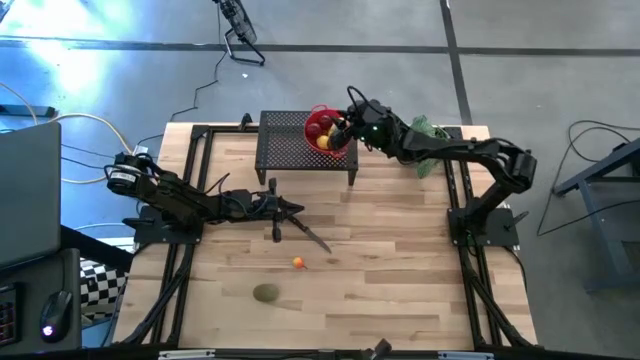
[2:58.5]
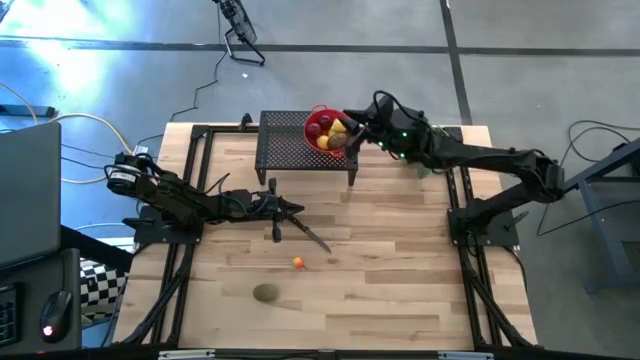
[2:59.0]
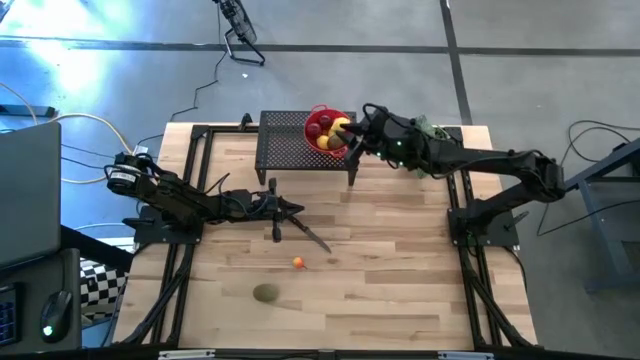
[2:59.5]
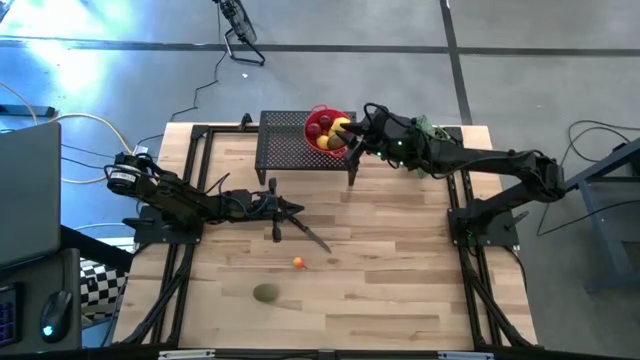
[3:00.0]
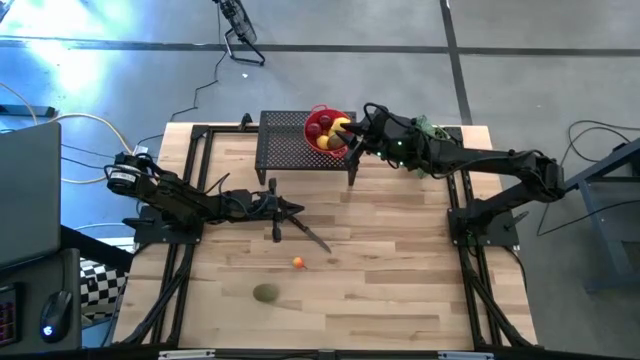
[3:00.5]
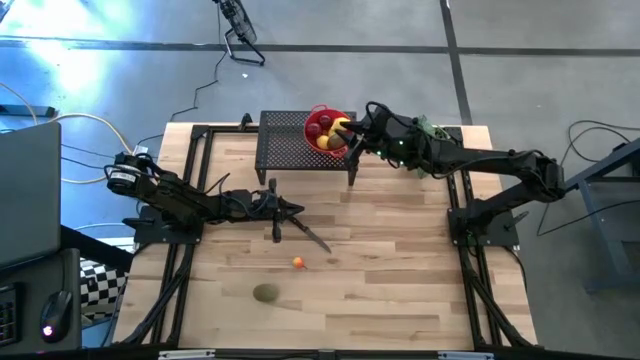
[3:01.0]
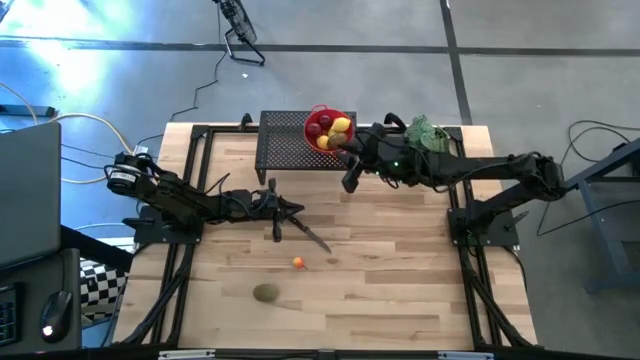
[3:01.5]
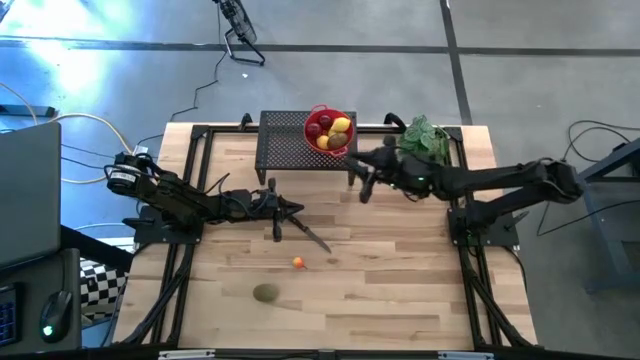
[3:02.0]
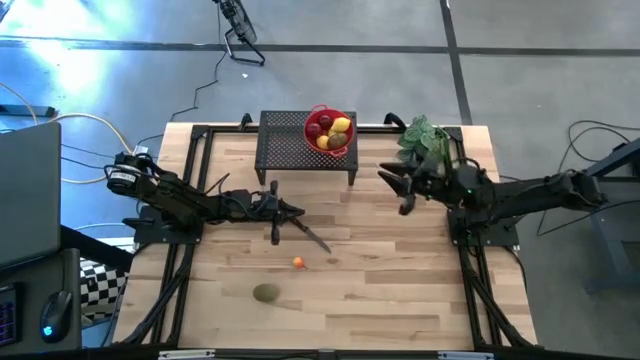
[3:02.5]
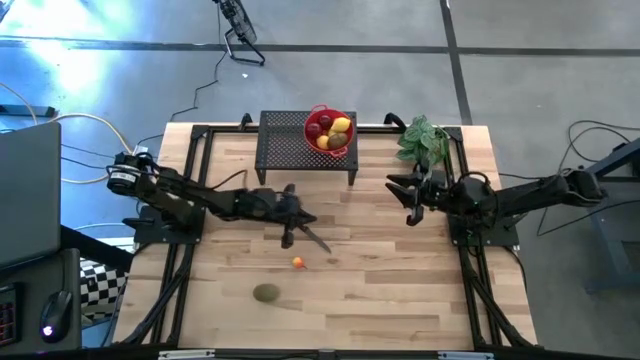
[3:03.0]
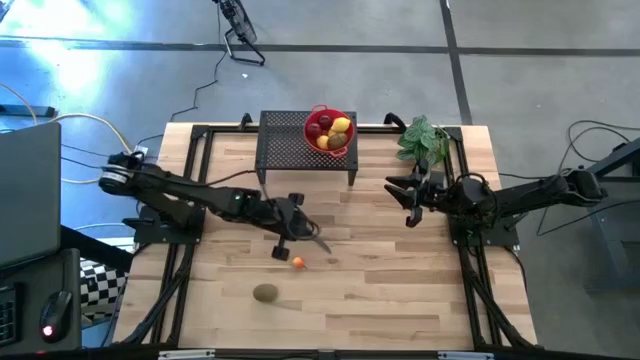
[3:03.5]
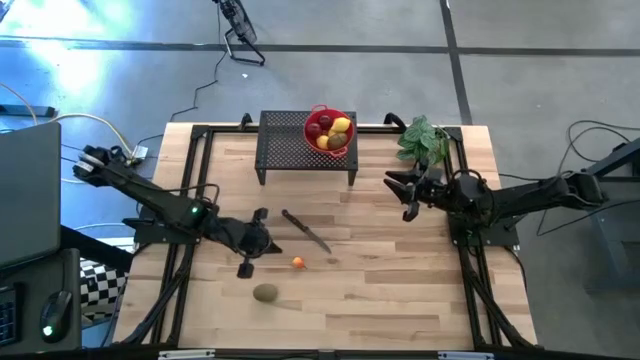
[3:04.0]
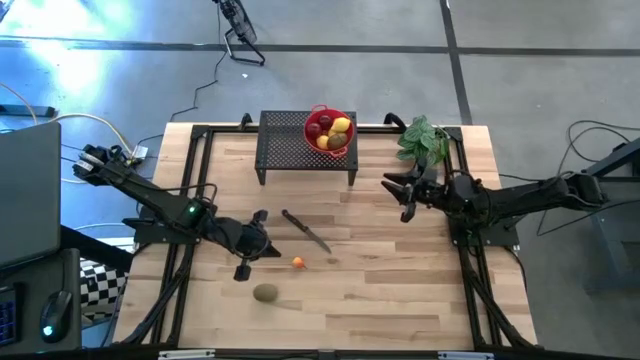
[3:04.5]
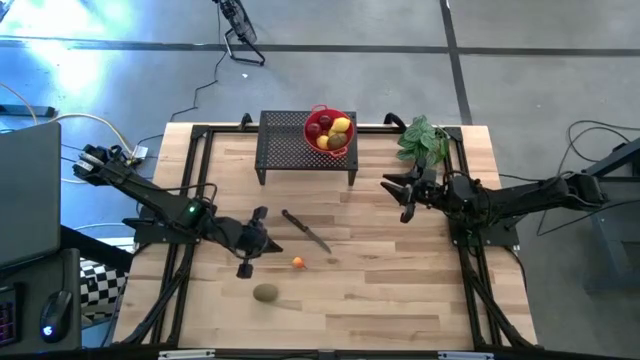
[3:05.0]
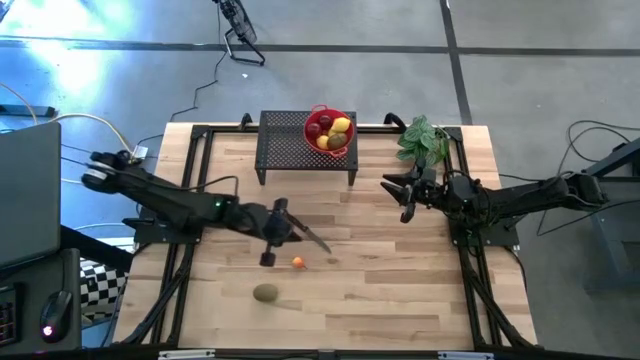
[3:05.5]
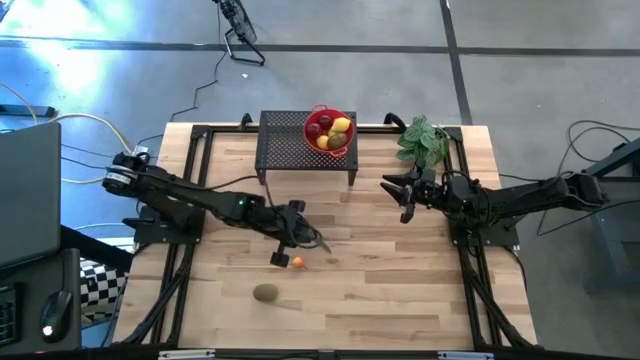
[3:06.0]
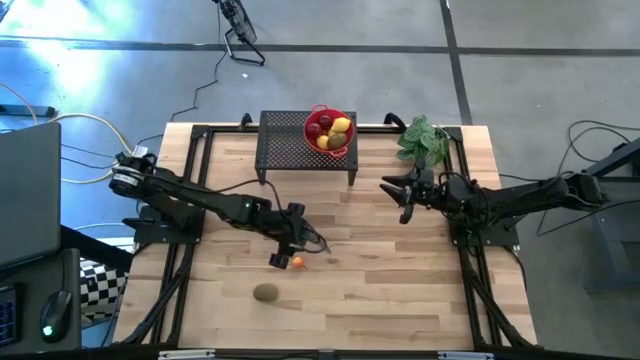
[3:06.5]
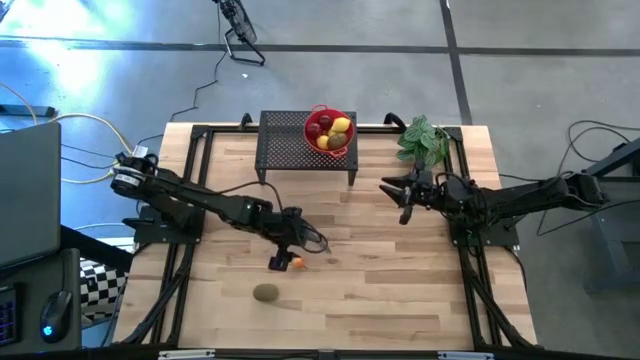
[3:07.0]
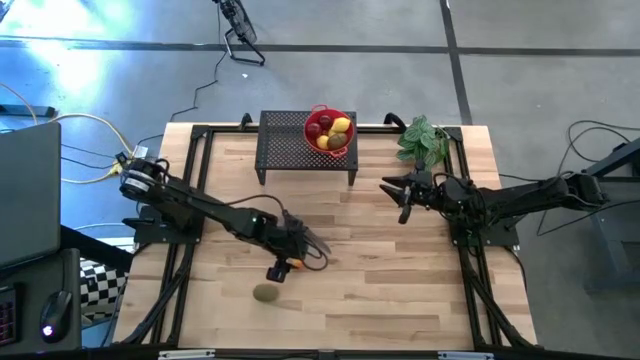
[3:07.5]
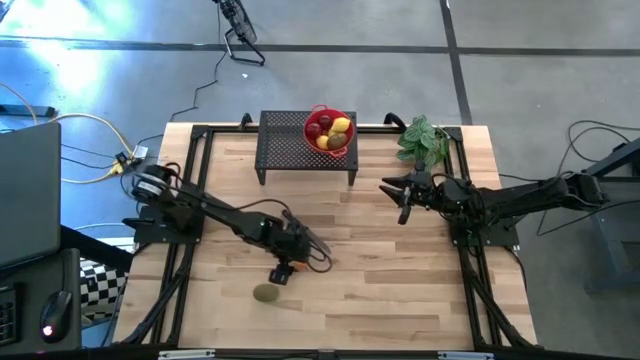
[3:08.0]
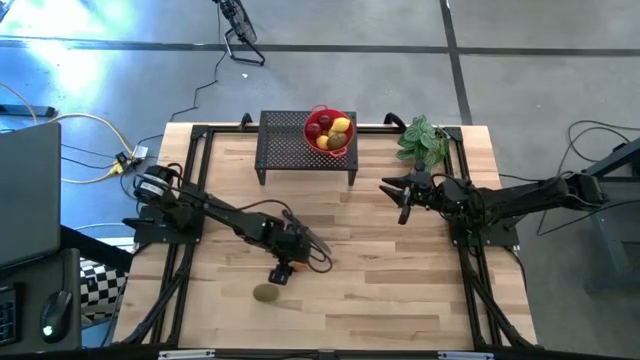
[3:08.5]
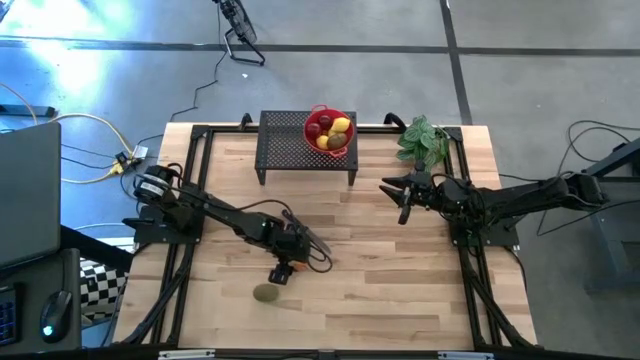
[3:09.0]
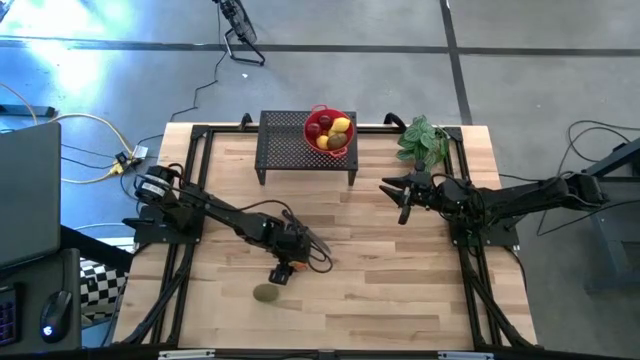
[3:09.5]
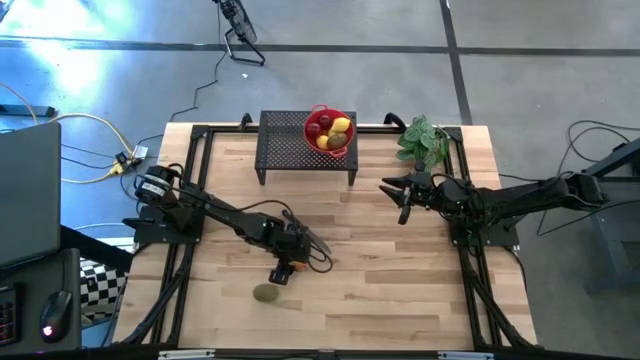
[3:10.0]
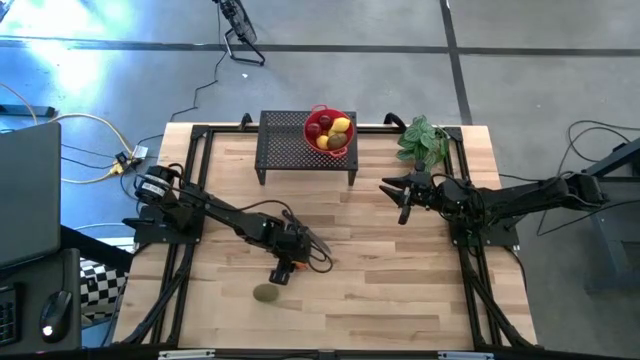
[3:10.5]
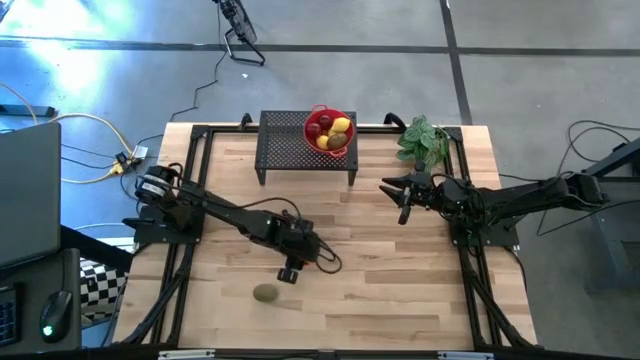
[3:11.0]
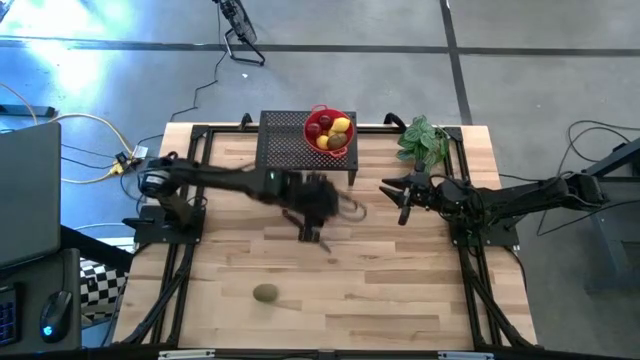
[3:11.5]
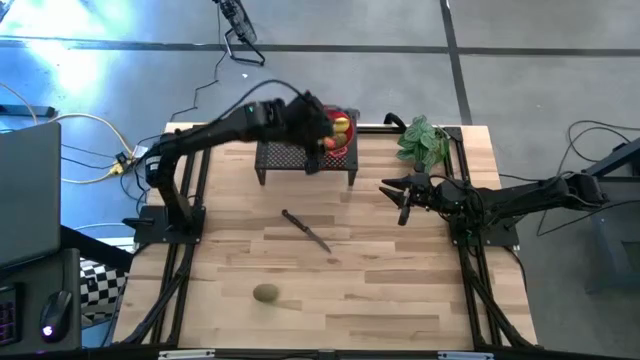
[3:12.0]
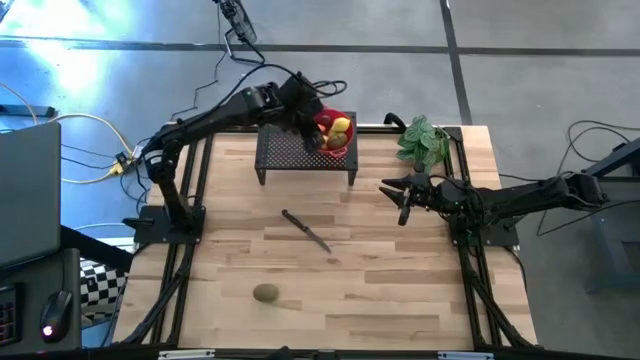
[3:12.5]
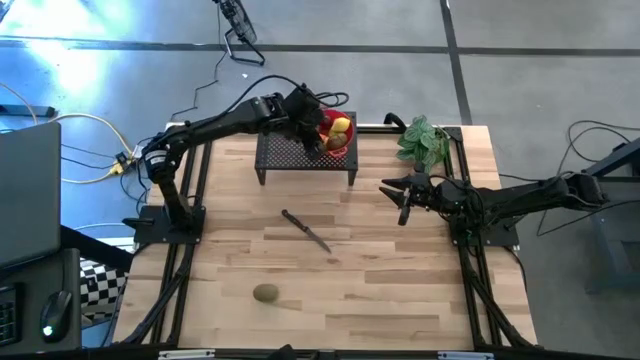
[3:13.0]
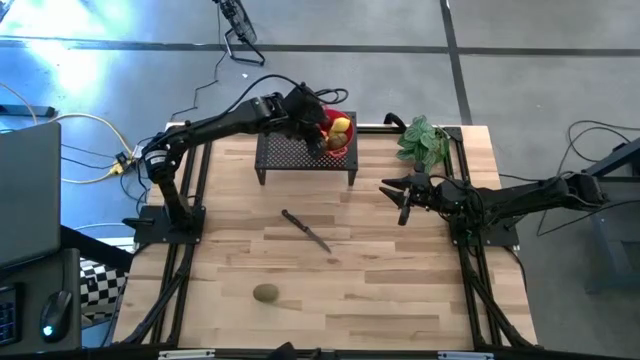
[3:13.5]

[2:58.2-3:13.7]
Task: Pick & Place Fruit
Put the pear into the colander on the shelf

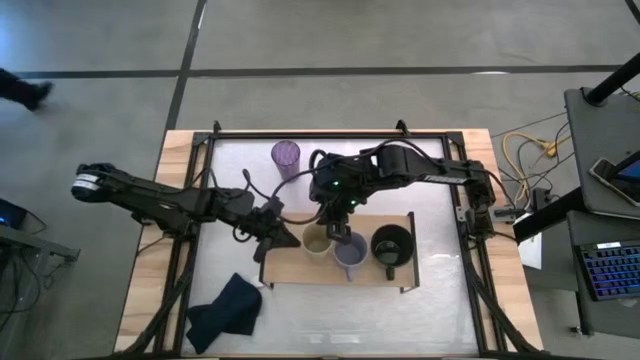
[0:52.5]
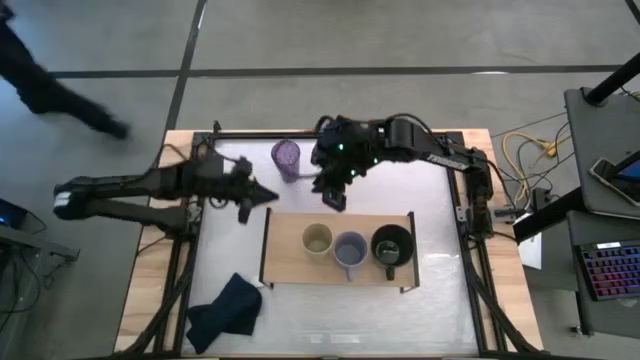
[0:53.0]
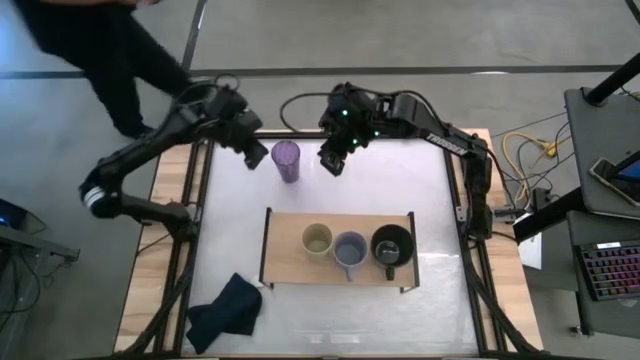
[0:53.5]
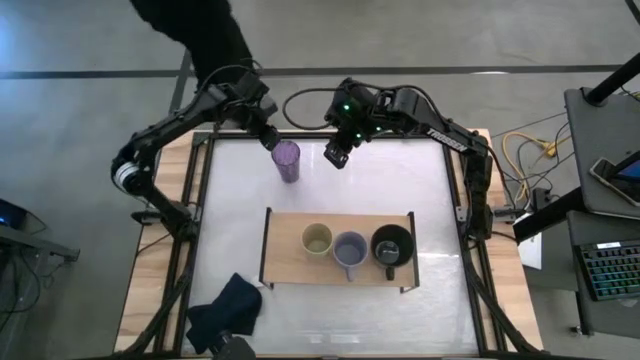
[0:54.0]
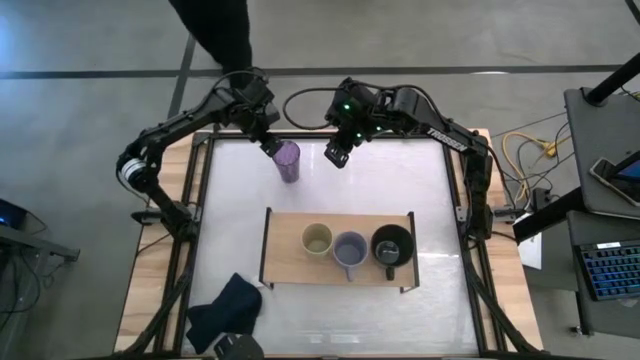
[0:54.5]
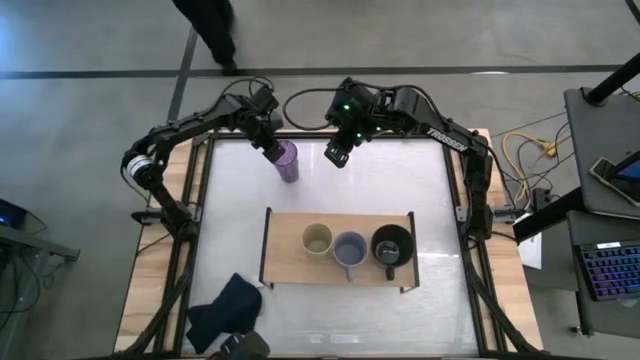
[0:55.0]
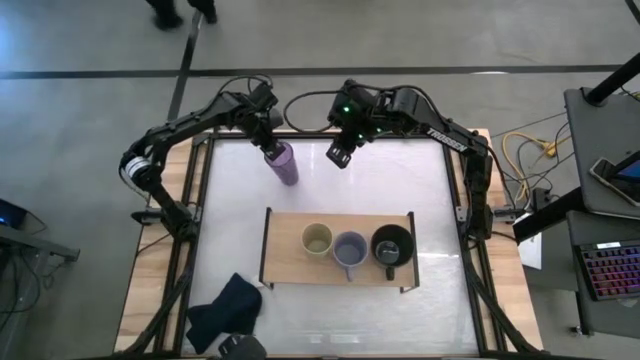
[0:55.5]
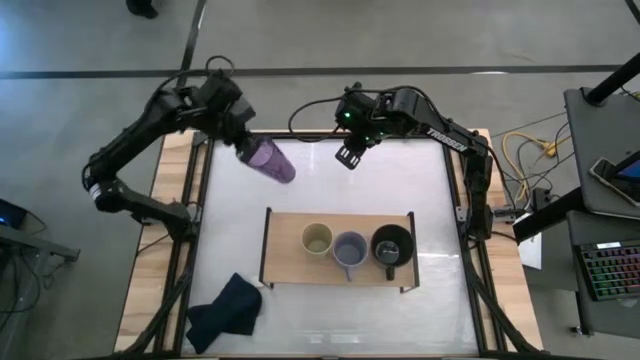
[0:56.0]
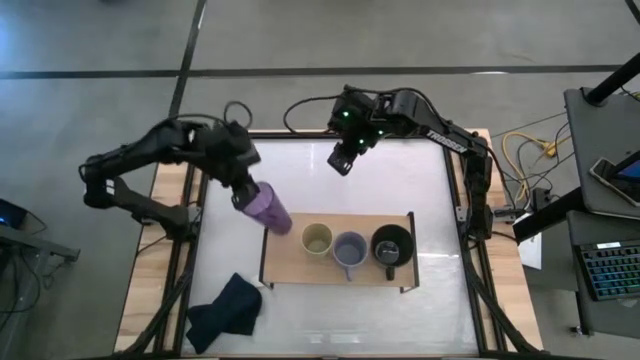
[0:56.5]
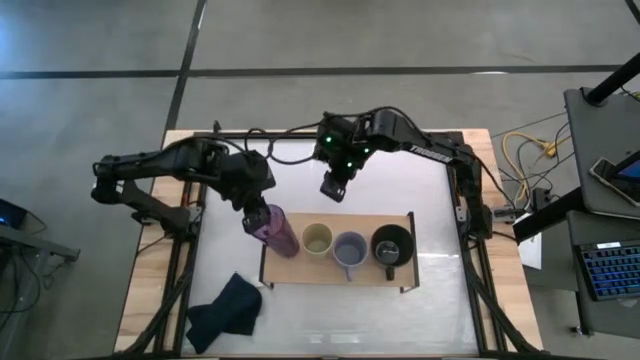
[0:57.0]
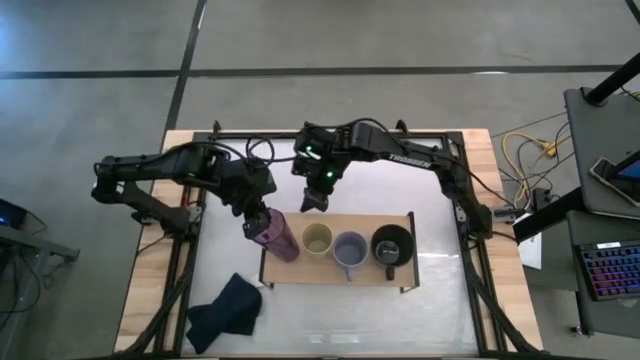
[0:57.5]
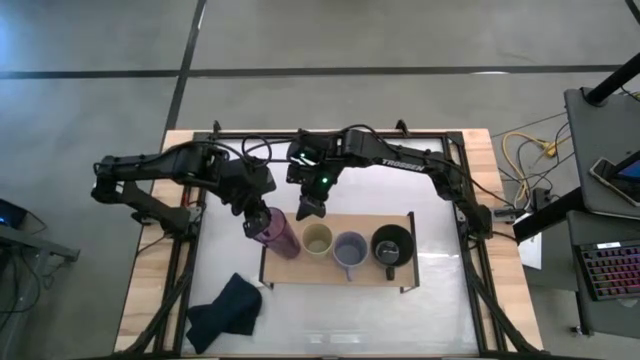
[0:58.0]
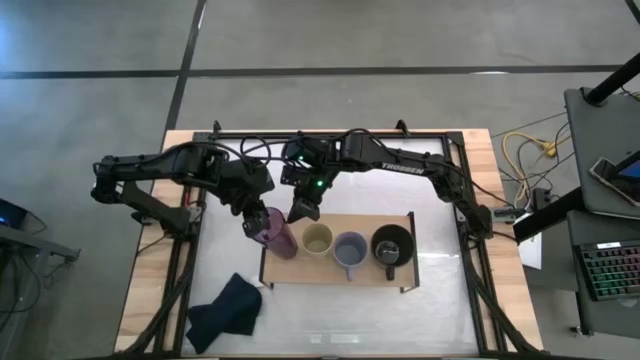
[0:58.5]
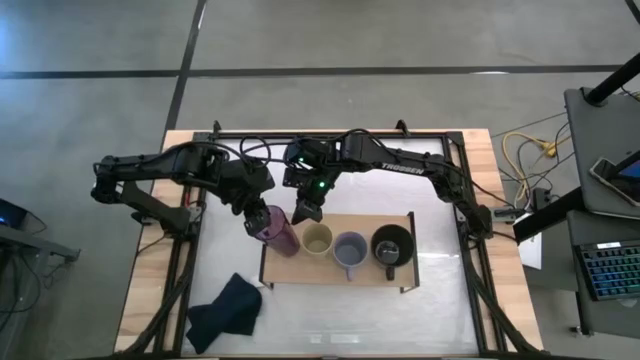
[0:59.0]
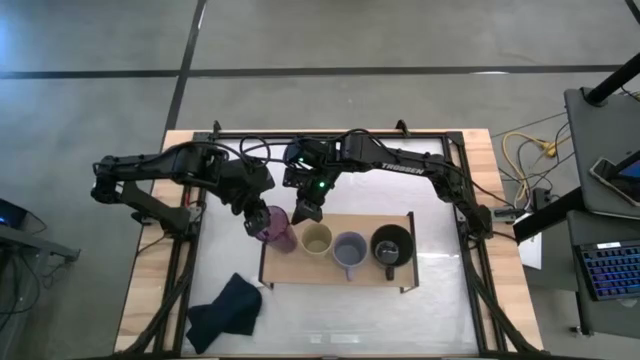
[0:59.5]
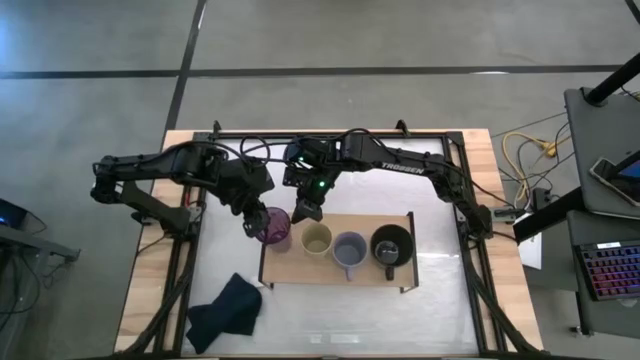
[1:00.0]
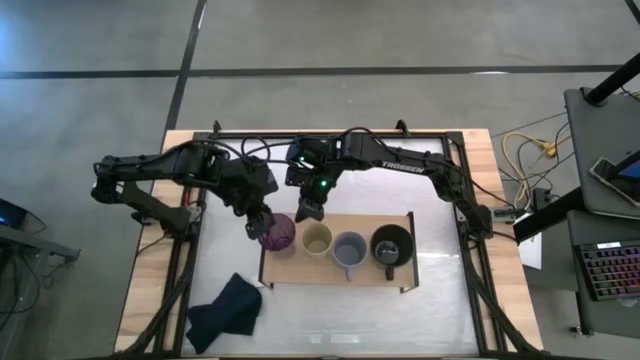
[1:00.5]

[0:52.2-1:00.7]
Task: Stack small to large cups/mugs on shelf
Put the purple cup on the shelf
